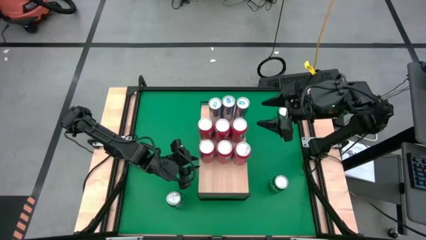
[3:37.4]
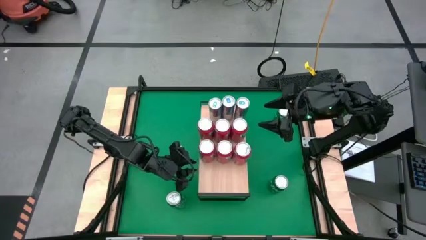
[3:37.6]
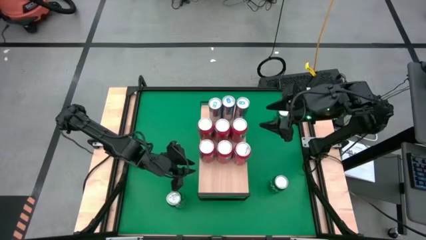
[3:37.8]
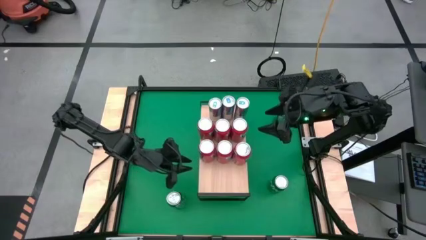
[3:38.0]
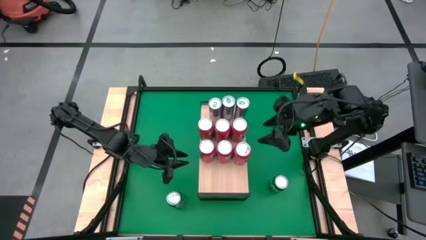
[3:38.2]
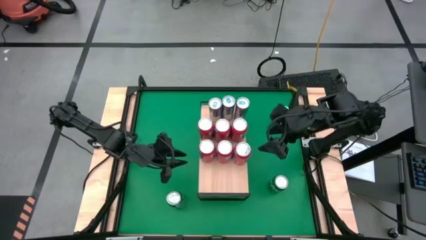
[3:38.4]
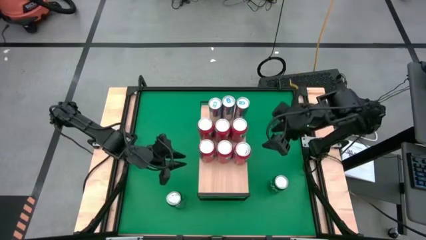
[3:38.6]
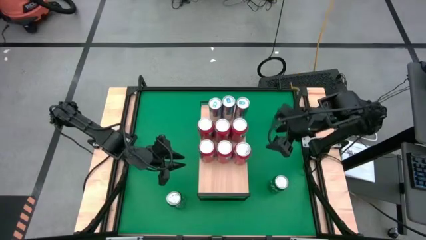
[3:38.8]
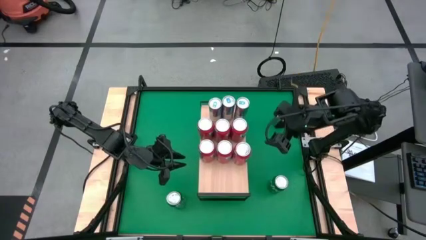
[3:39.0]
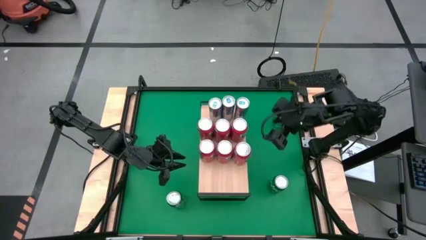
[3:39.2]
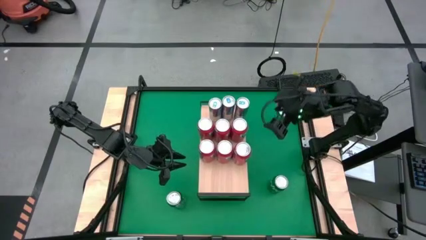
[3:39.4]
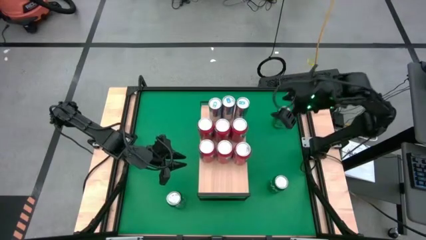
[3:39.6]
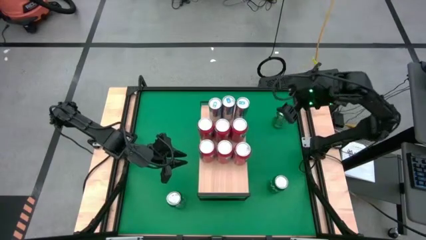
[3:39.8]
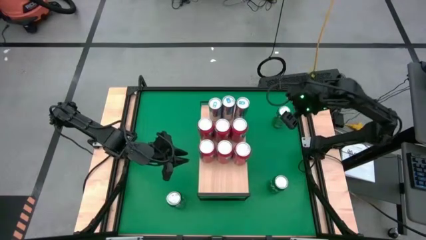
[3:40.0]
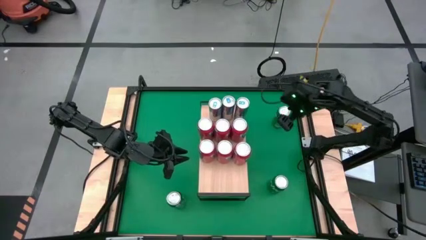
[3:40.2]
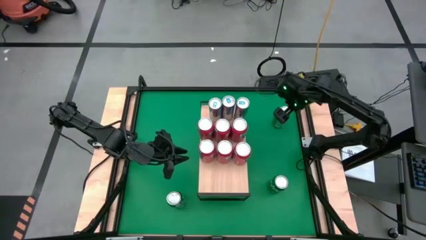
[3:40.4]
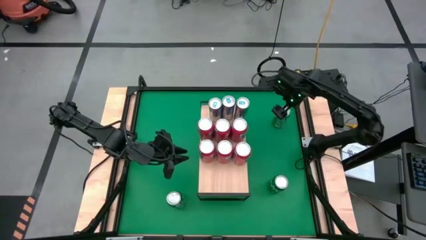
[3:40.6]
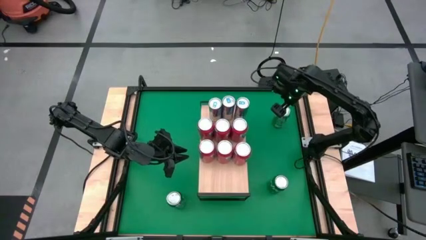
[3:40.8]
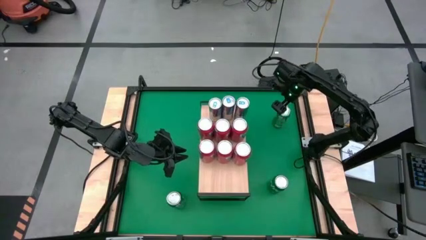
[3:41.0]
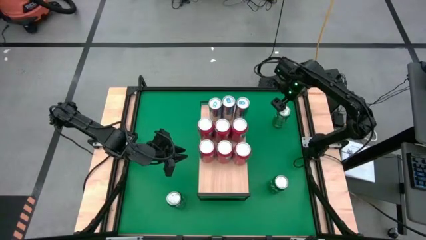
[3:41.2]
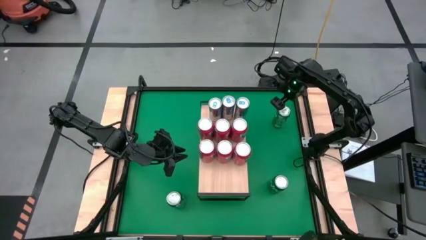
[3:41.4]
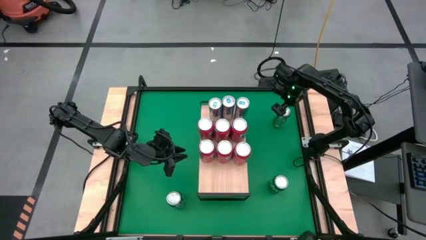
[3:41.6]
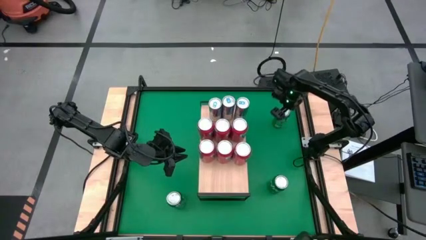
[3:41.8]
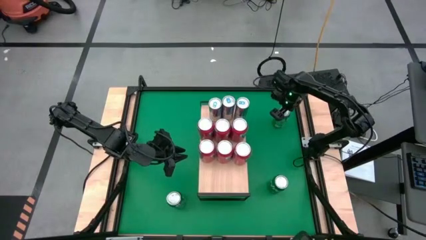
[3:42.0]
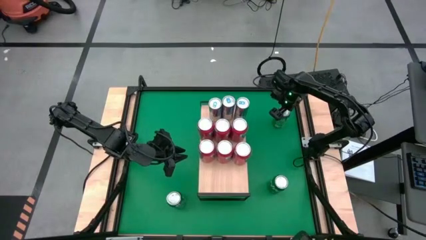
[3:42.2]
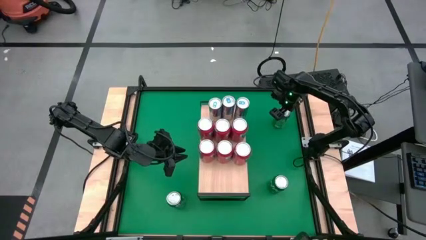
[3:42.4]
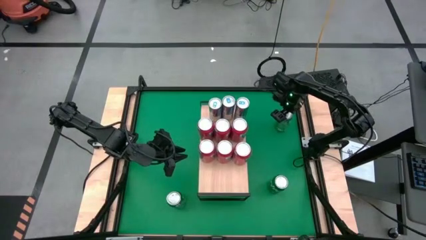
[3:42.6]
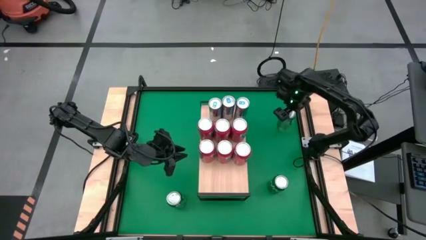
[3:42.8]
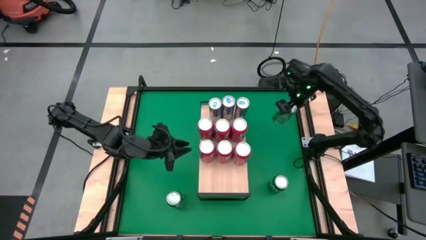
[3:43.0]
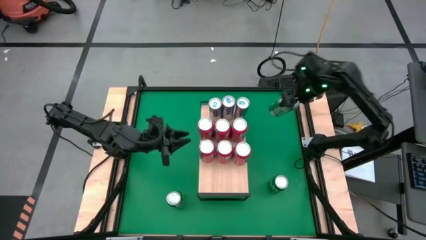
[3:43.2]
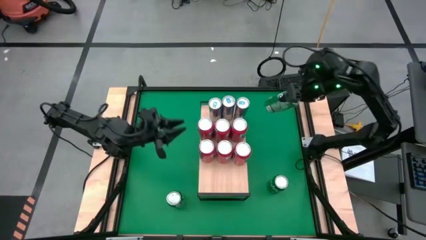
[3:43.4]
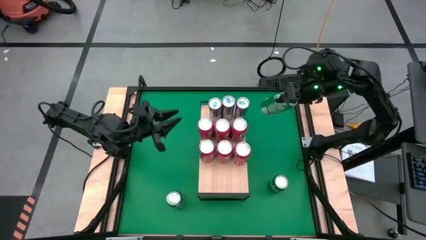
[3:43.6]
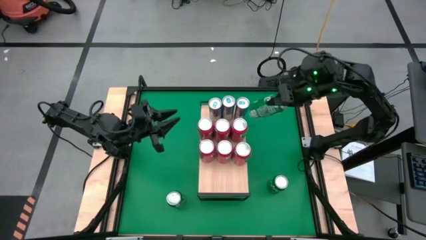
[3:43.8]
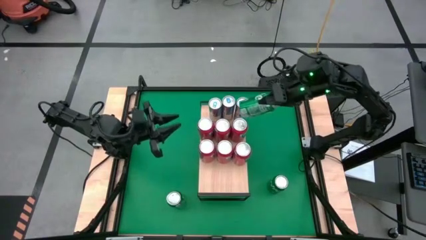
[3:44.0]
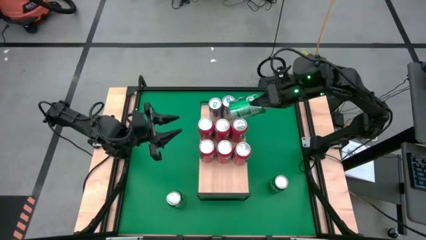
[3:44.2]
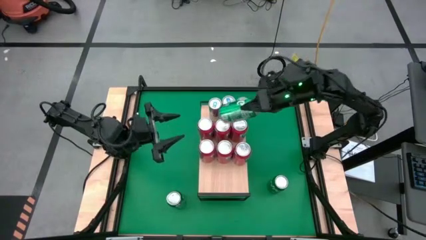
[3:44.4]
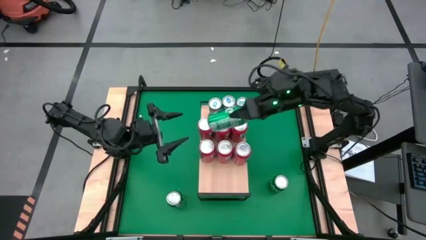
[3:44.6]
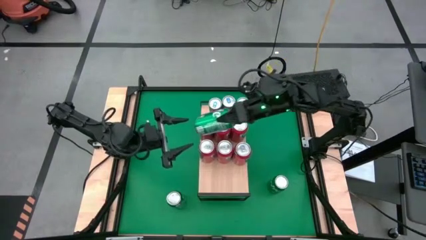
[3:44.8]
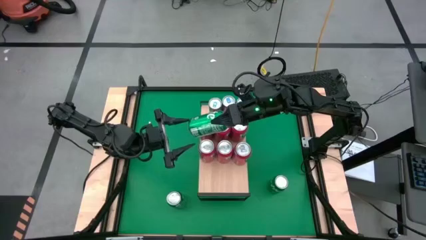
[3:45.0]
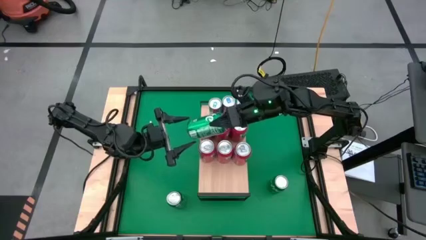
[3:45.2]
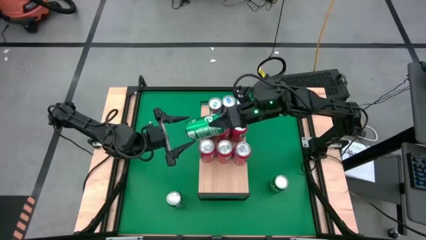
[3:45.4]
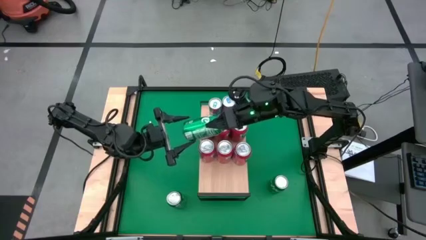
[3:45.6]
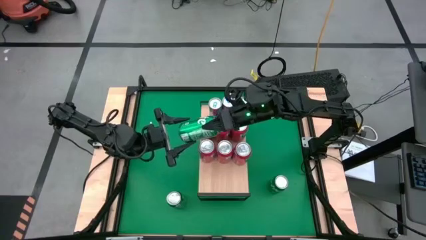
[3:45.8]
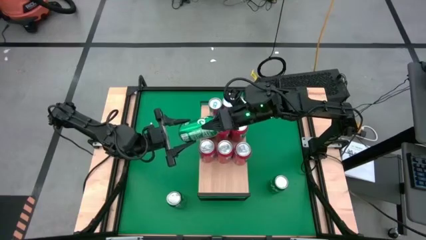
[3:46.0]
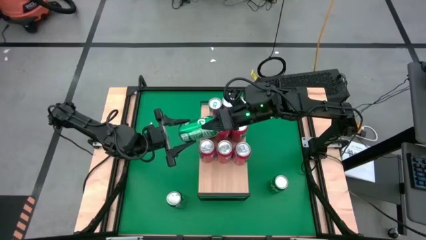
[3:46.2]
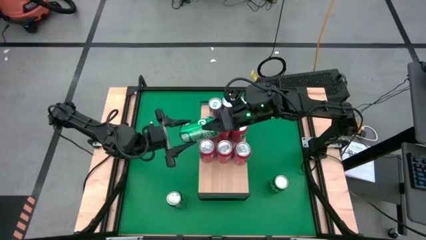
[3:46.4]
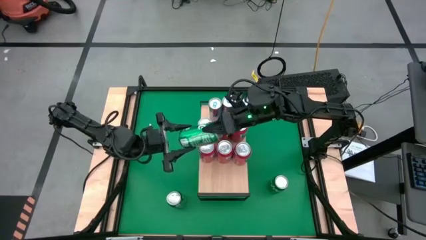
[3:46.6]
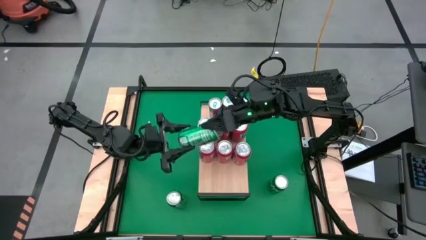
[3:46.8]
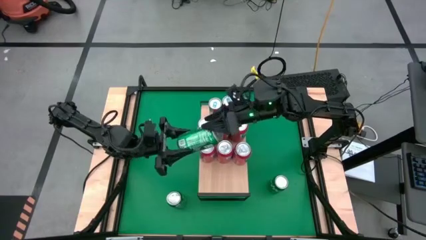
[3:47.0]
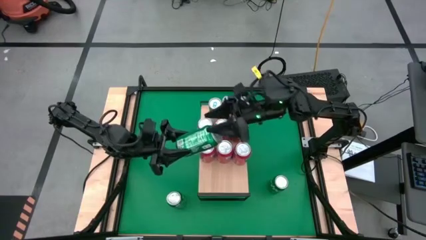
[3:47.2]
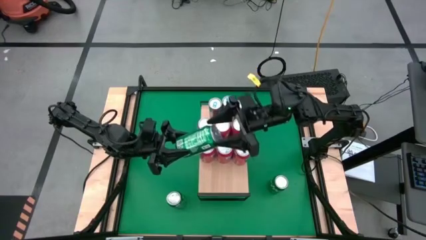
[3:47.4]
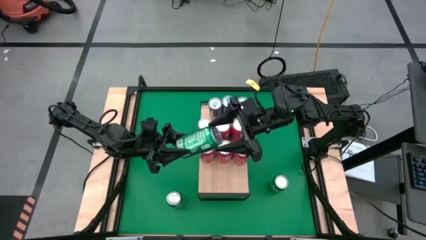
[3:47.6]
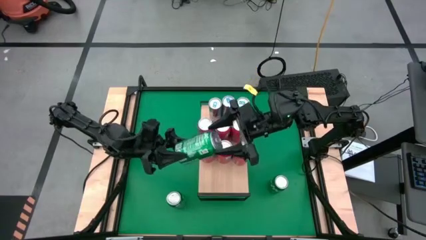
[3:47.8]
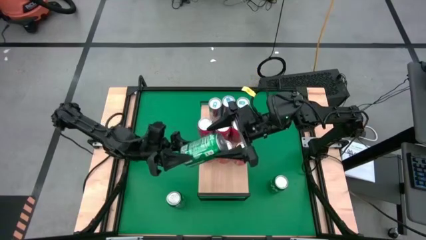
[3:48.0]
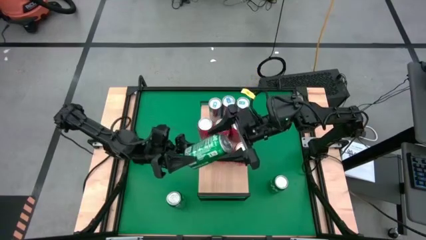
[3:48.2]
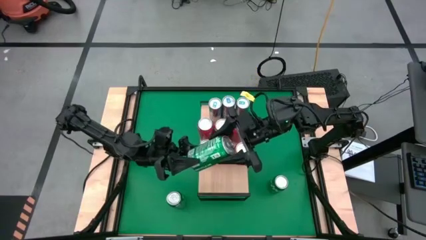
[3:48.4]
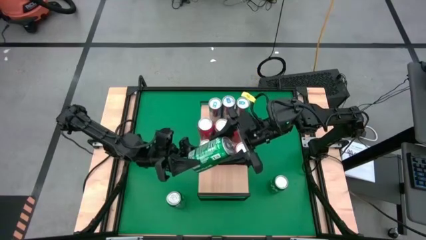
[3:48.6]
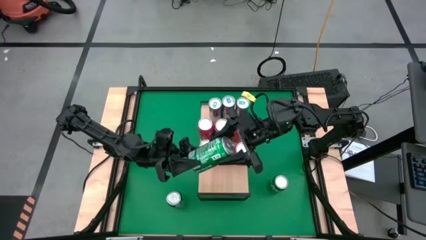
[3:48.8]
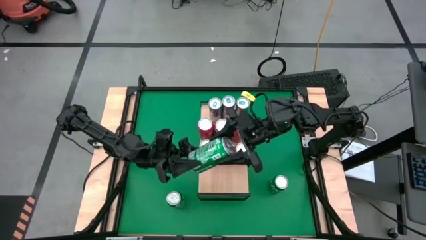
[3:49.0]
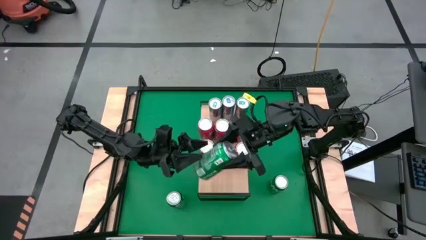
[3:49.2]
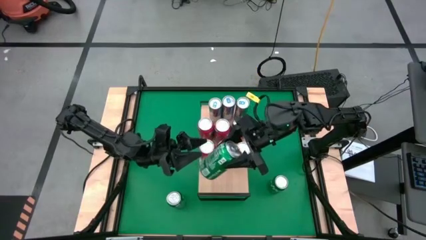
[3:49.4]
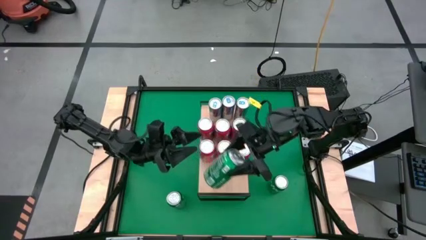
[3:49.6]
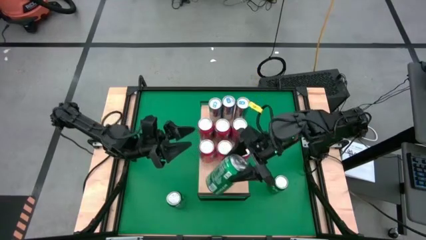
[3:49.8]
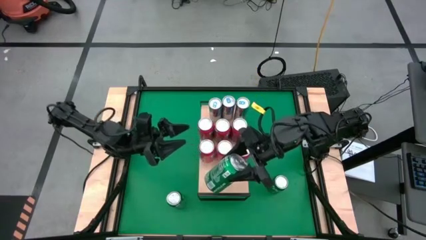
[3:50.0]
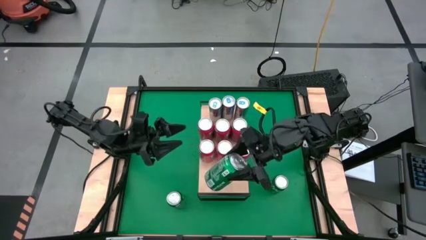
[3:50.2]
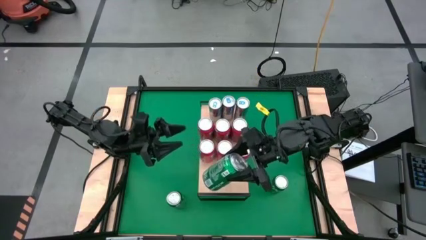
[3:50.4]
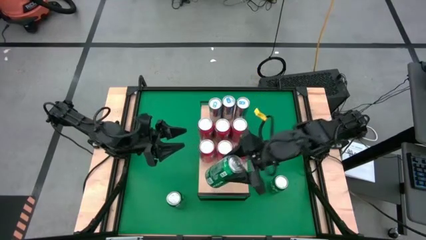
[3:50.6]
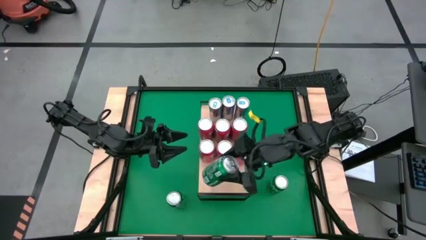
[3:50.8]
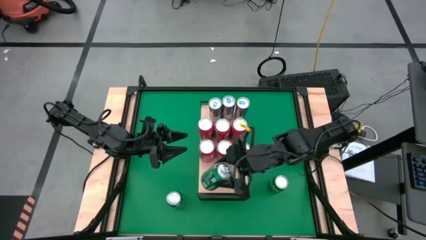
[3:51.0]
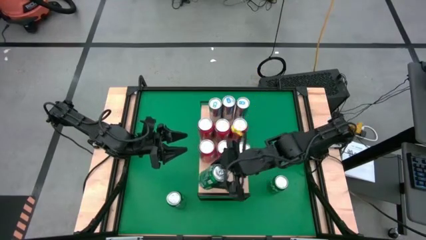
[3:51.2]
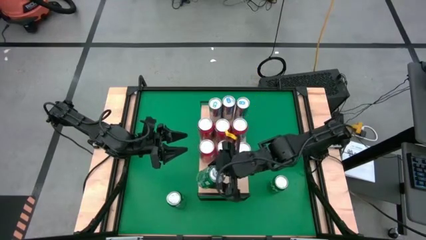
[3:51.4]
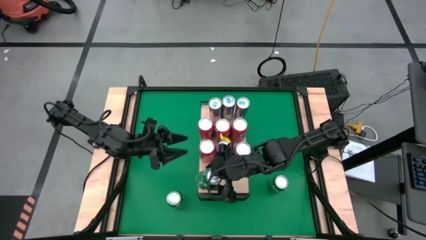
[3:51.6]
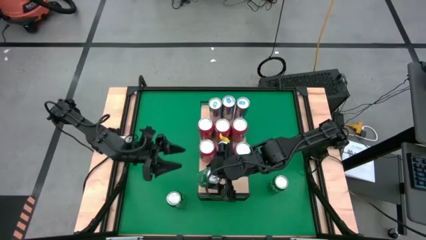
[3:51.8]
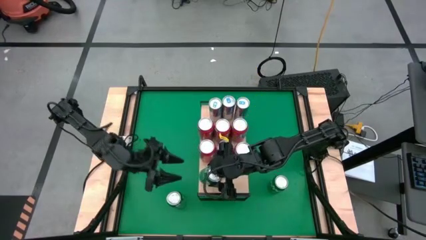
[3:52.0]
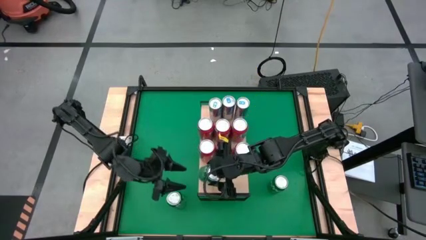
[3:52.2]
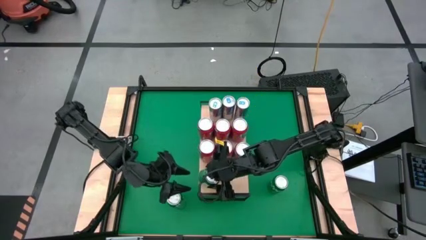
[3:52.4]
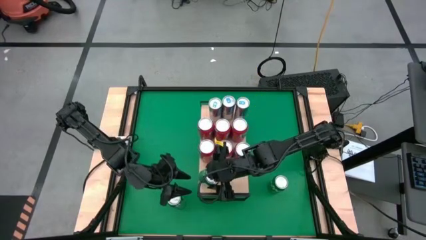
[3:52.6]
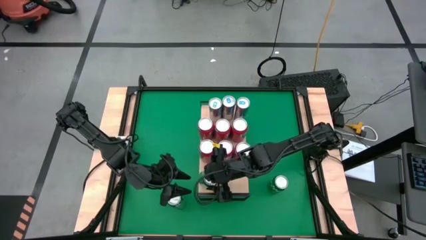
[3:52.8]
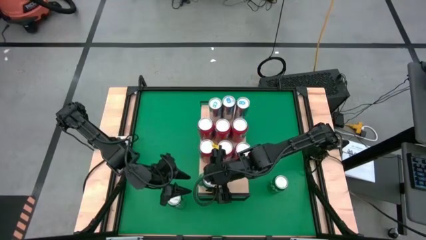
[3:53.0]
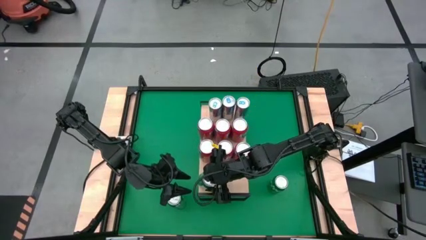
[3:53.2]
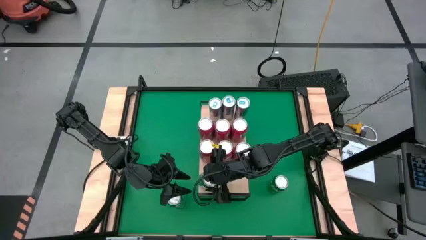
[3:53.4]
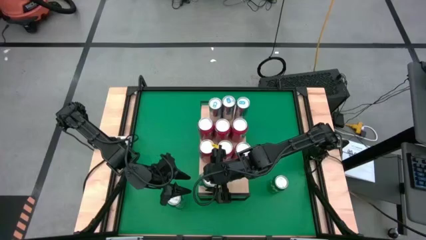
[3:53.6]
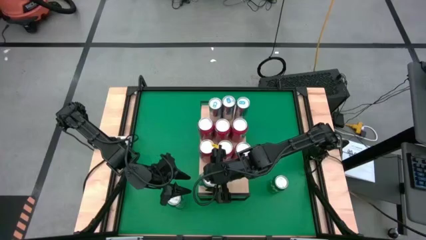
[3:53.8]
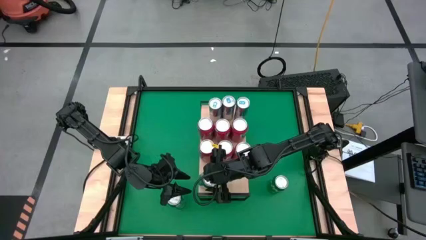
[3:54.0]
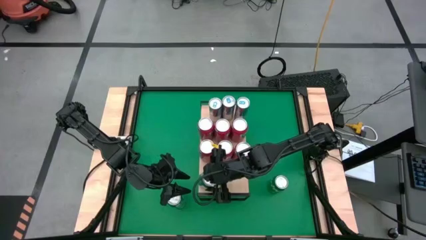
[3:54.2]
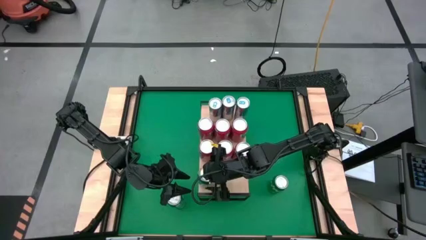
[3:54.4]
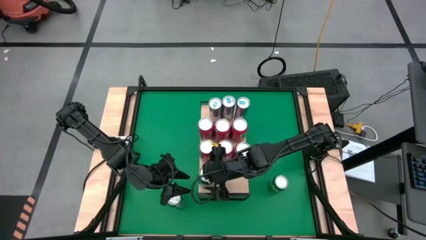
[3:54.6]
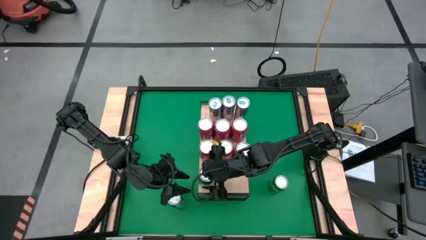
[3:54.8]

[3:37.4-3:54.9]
Task: Place canned beverage on shelf
Put the green soda can on the shelf
